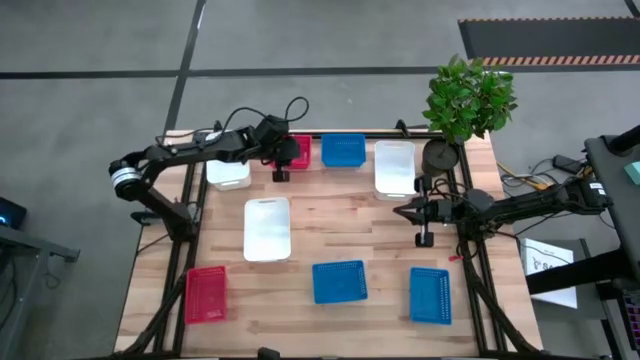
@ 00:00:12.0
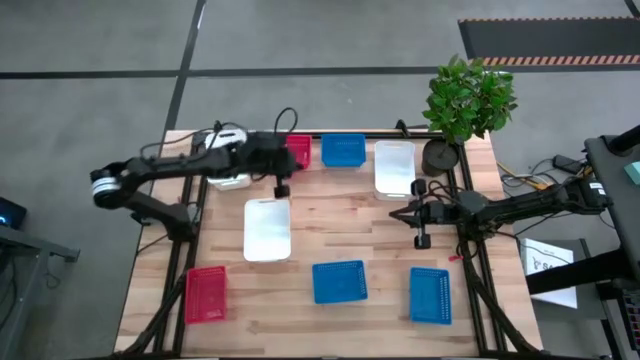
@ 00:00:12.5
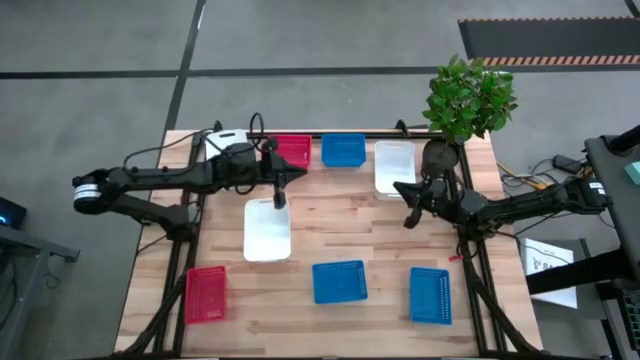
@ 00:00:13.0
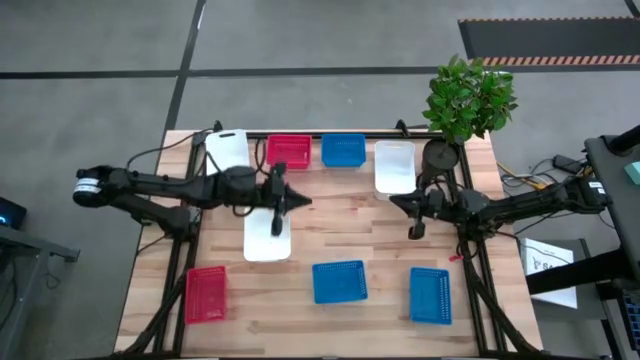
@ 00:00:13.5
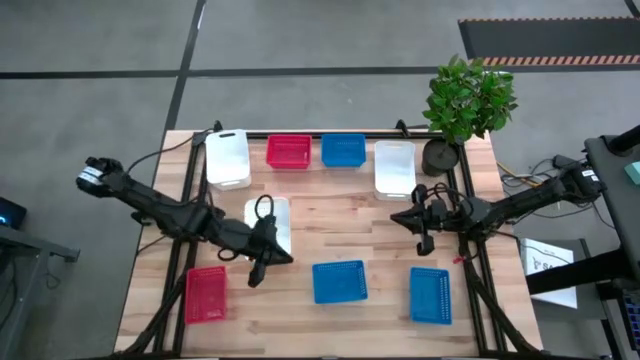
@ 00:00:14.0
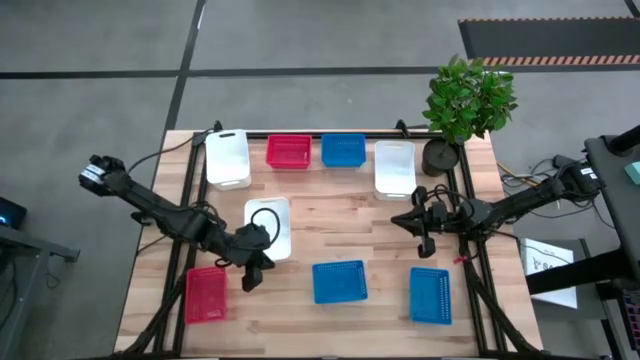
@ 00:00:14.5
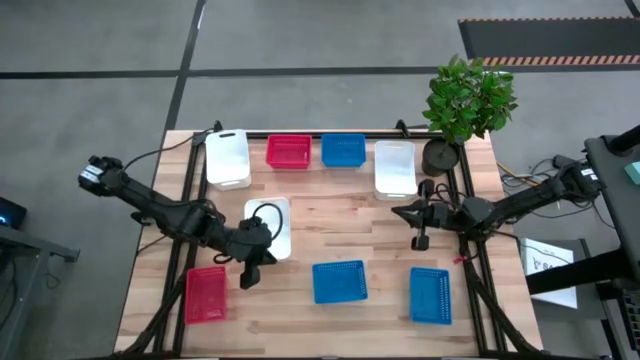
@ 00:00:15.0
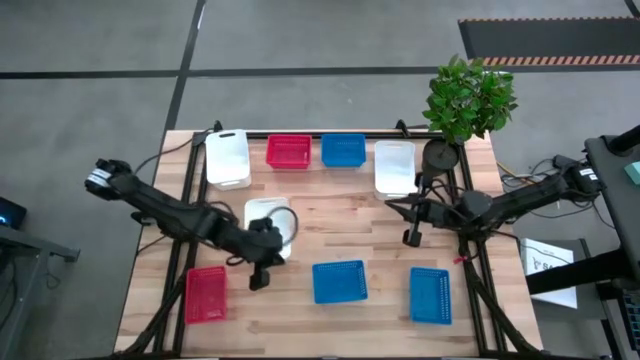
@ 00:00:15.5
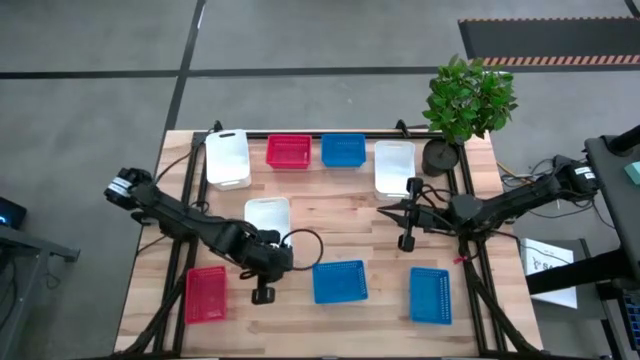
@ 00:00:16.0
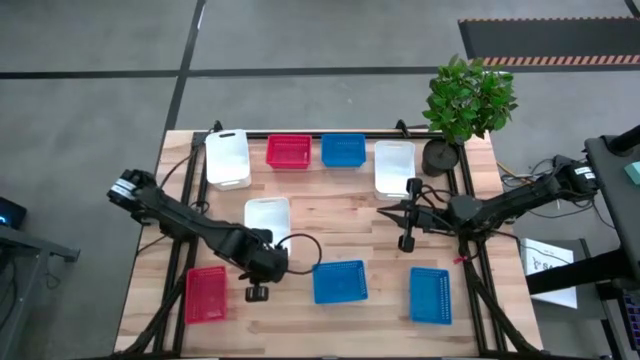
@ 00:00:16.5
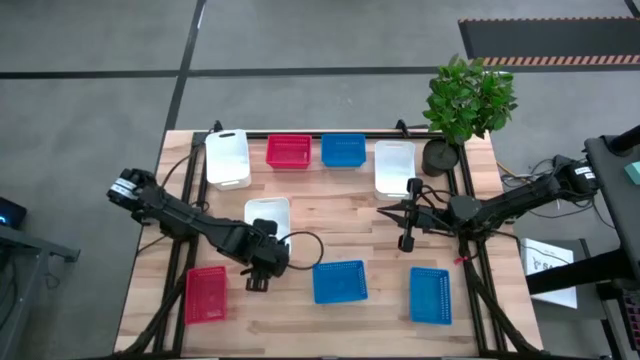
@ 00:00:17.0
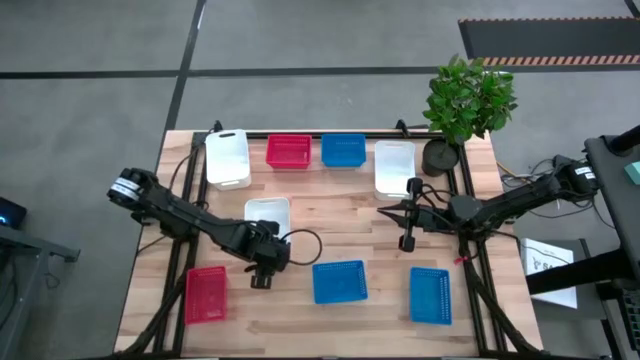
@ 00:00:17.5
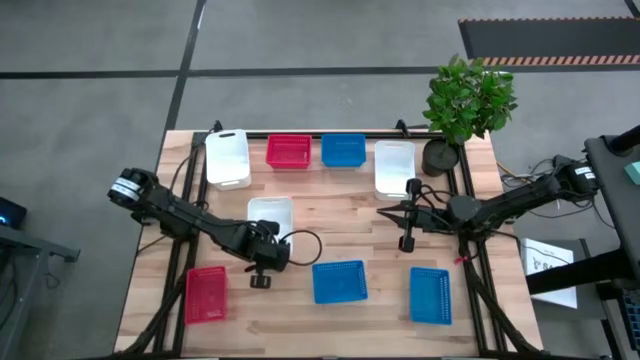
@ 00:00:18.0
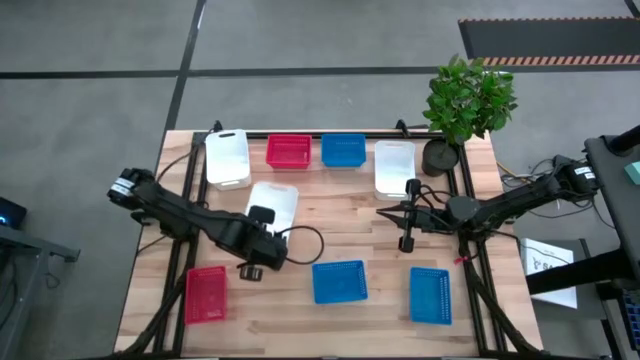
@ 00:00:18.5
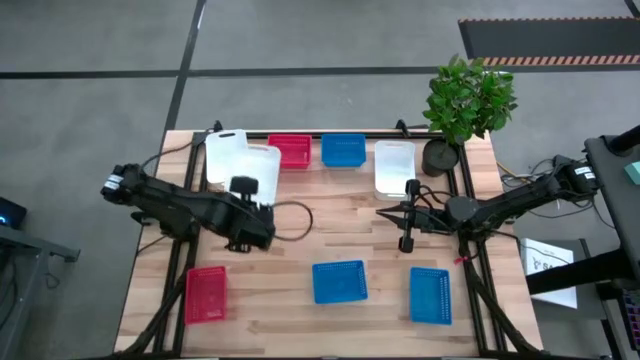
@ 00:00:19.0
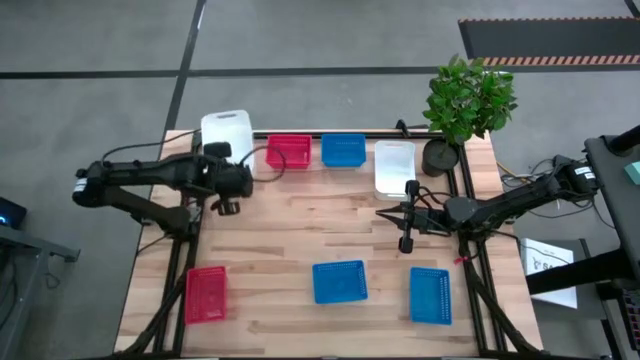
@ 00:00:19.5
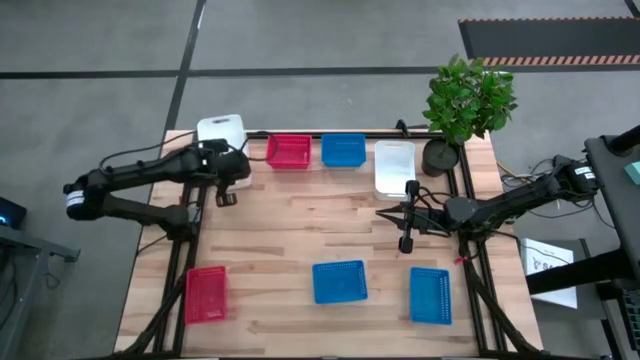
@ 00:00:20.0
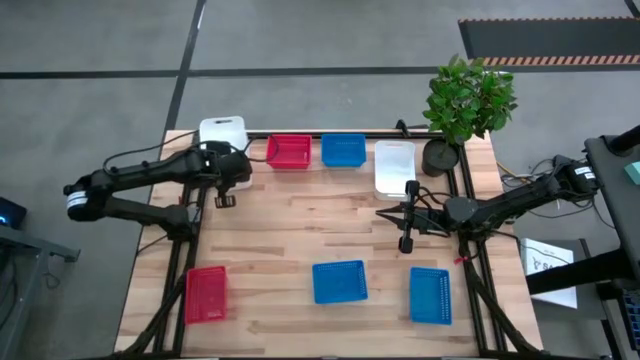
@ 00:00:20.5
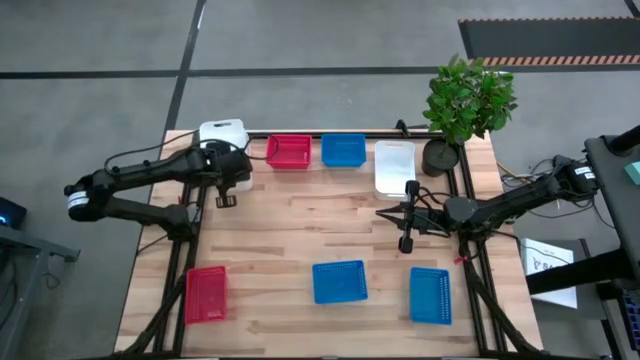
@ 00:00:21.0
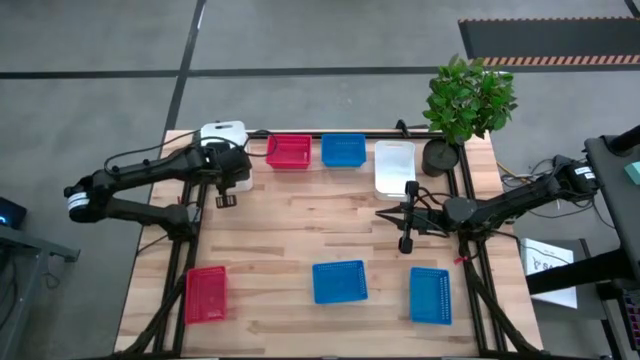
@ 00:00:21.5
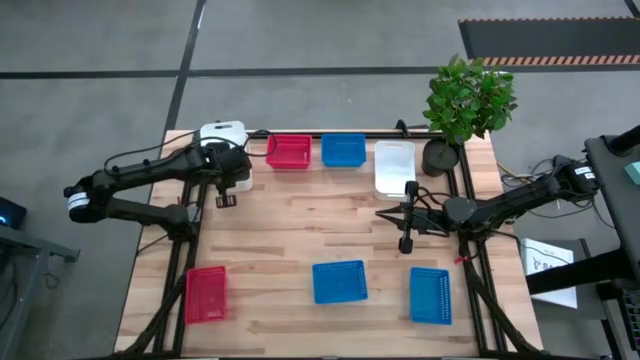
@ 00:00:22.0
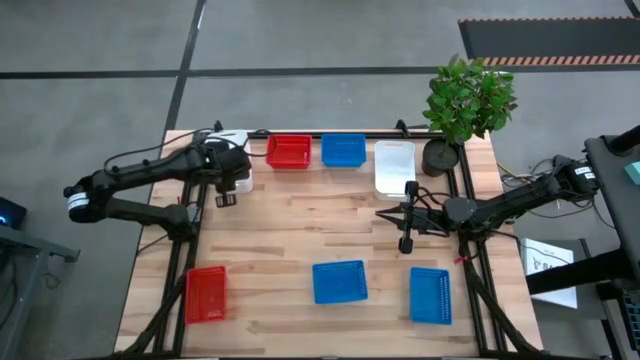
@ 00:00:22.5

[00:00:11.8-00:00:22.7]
Stack the bottom white bin on the top left white bin

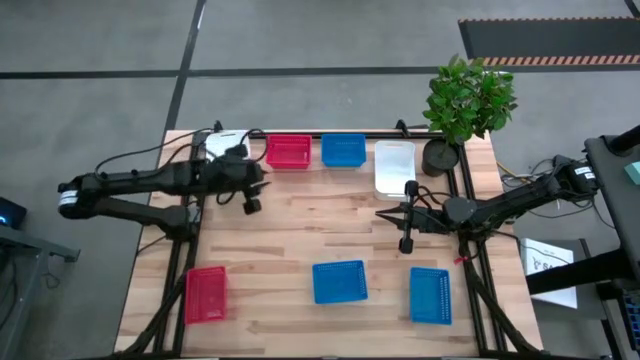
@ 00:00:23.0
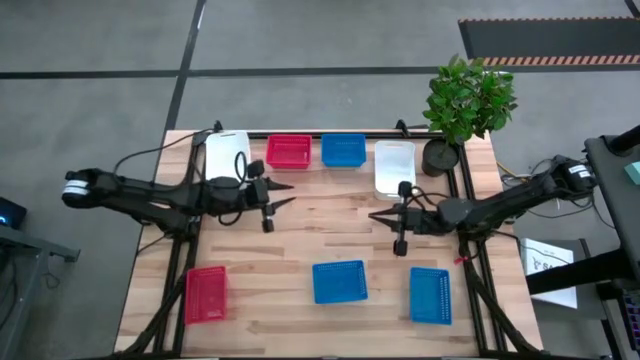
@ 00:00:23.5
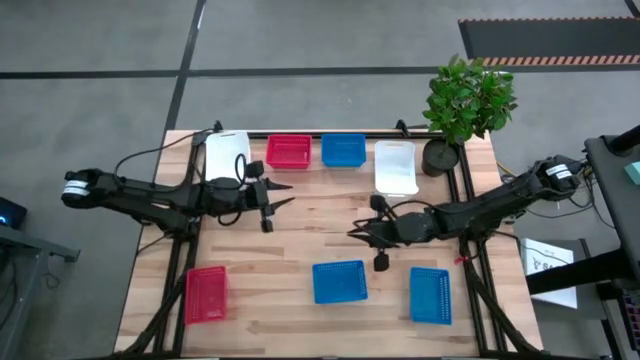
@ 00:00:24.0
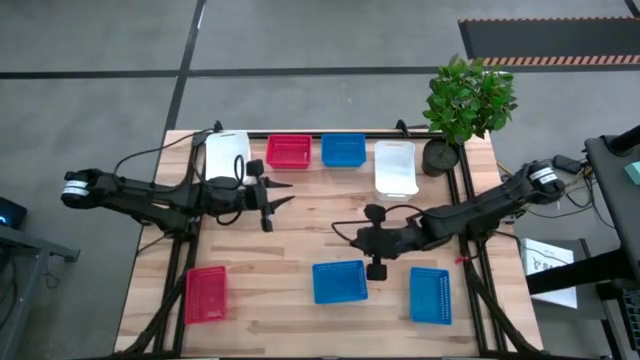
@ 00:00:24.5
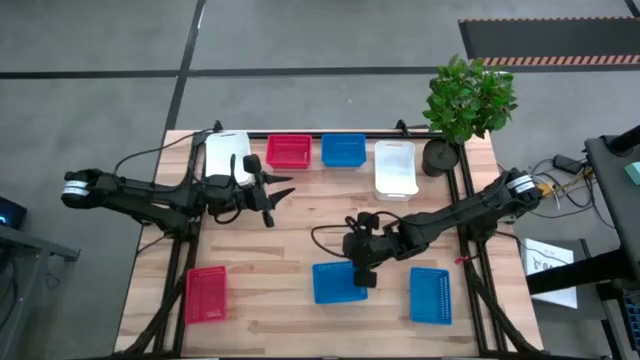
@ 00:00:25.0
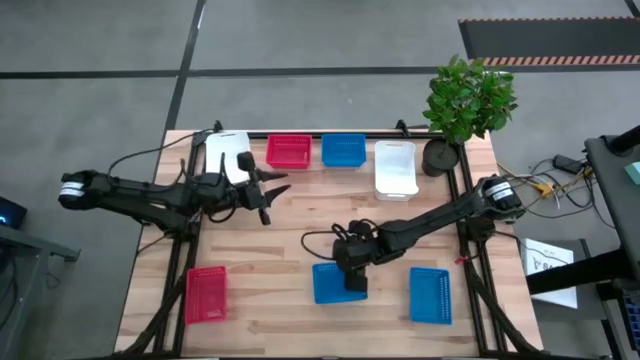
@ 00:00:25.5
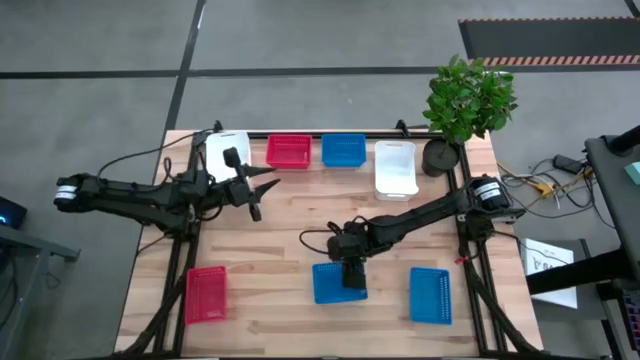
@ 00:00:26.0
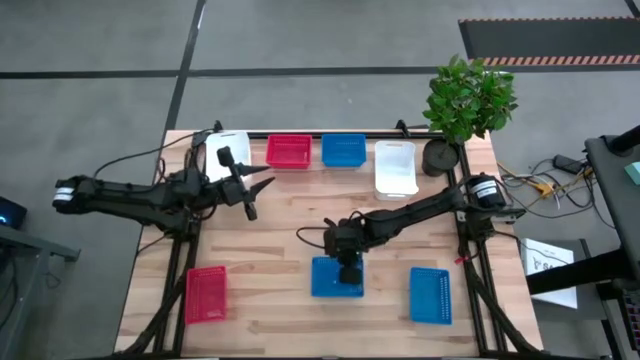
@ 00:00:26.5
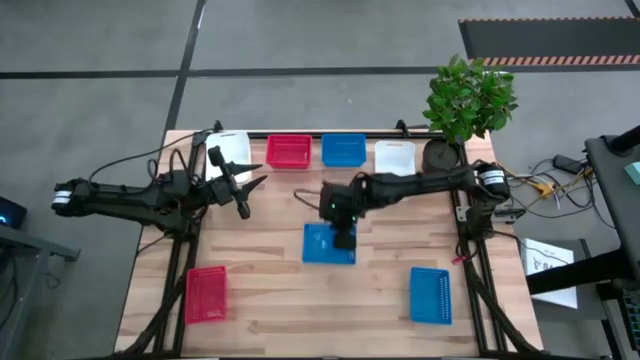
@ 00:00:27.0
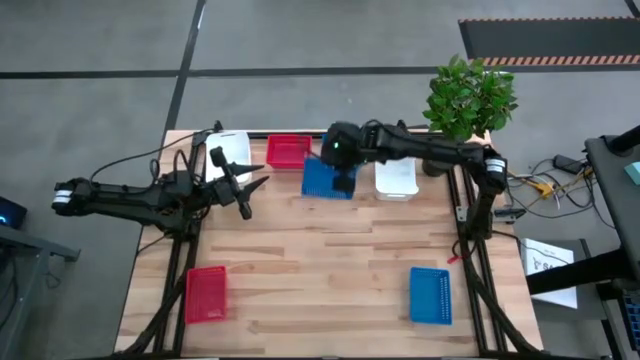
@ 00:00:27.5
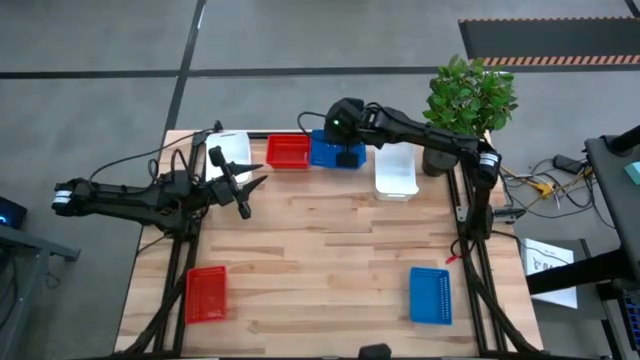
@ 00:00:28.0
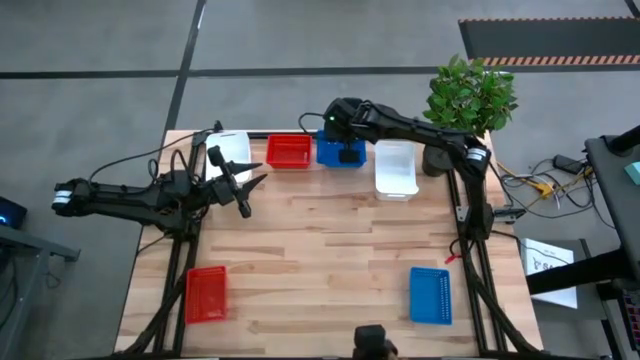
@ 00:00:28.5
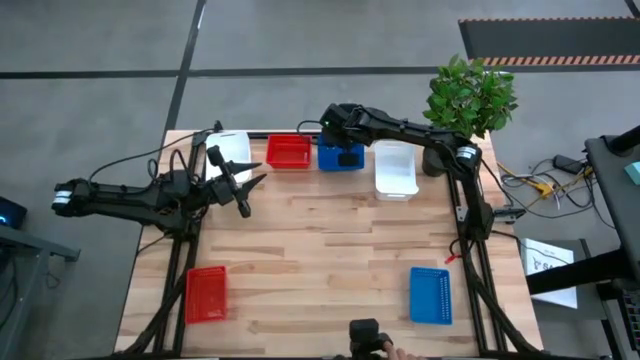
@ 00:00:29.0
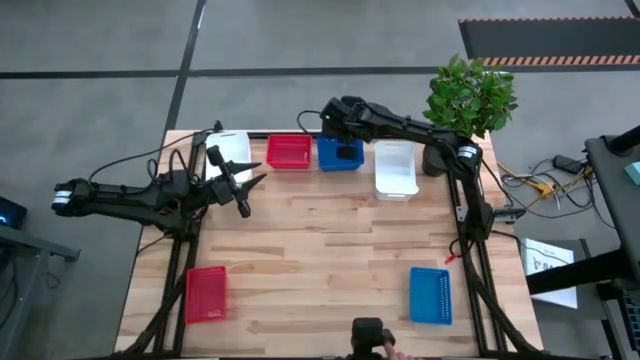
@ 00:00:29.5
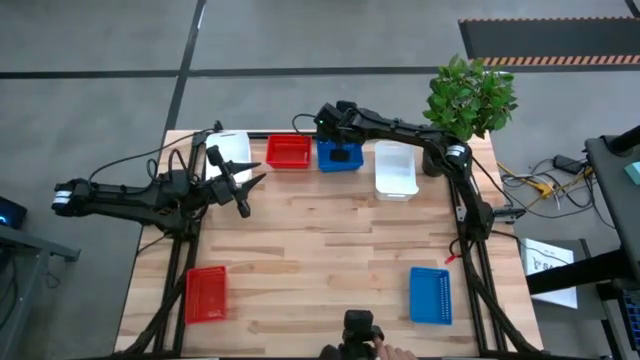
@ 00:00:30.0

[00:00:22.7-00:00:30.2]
Stack the bottom left blue bin on the top blue bin
